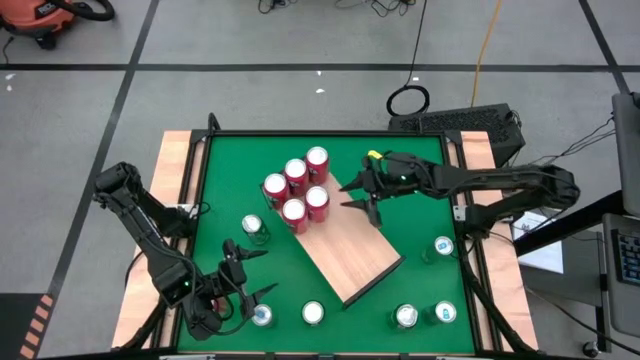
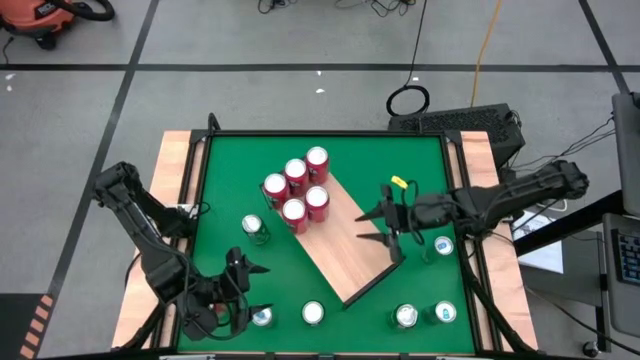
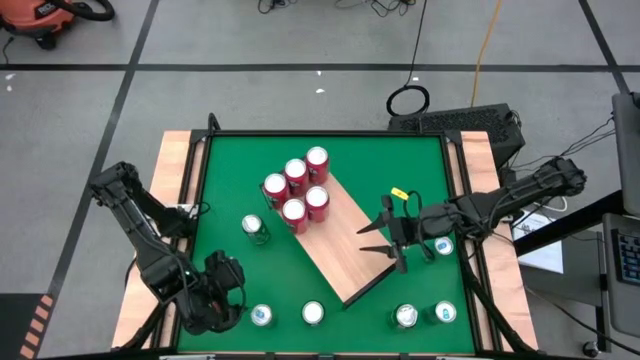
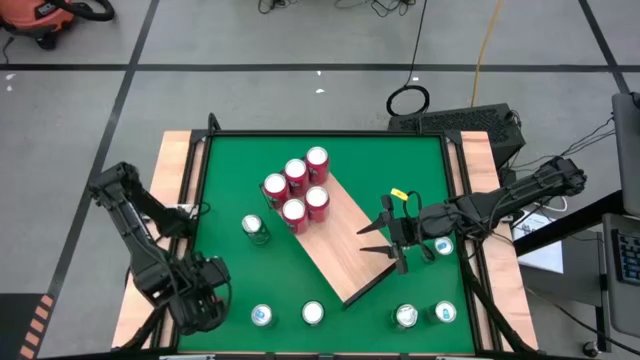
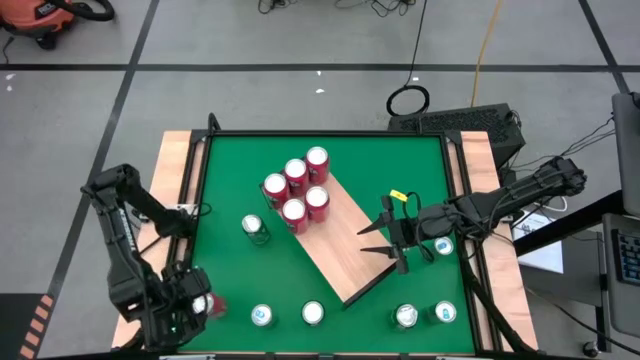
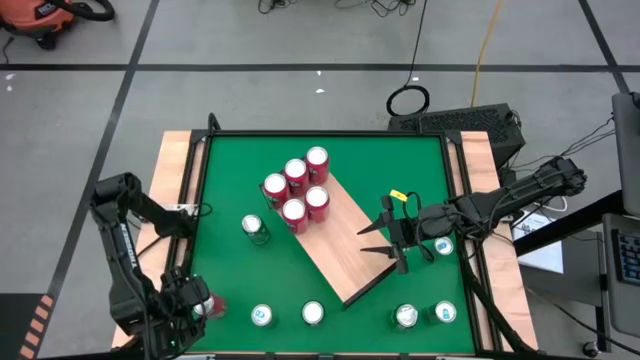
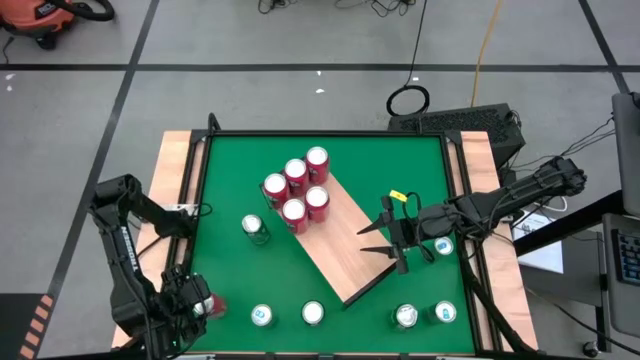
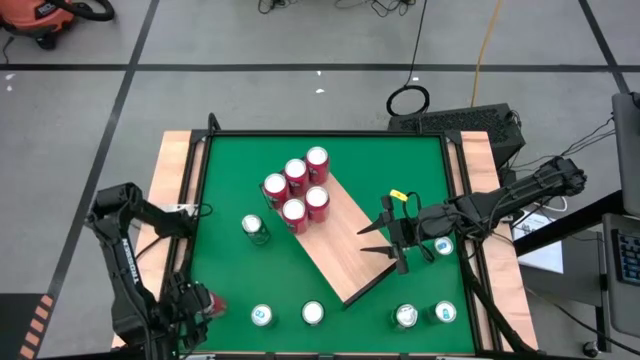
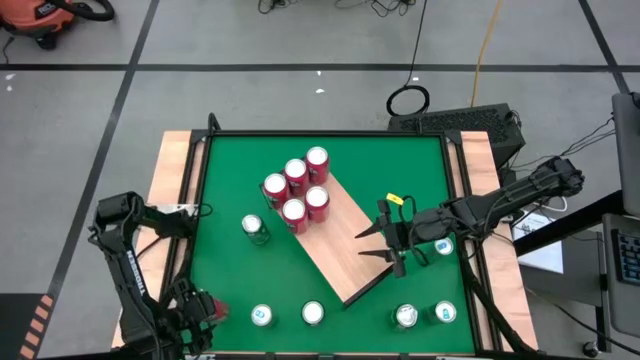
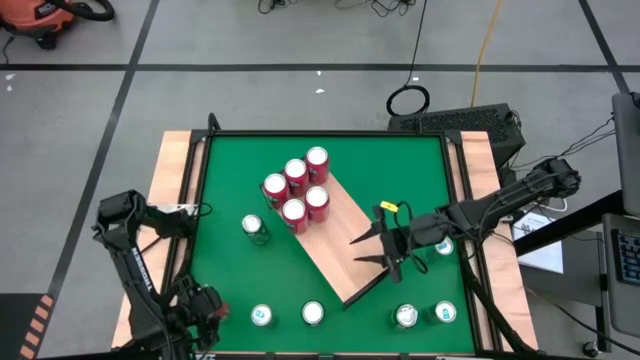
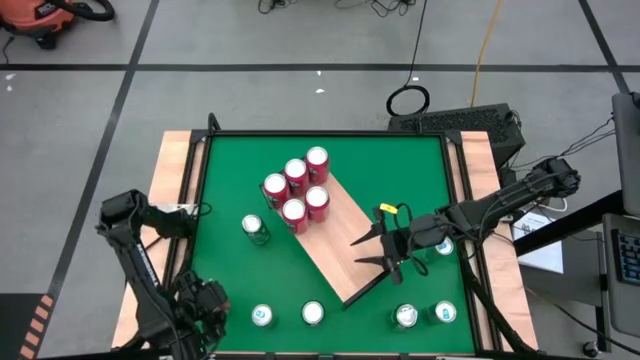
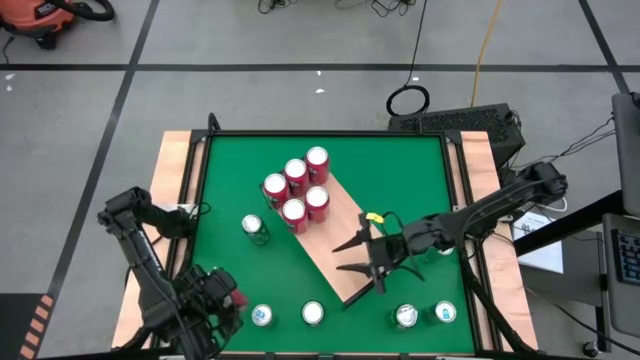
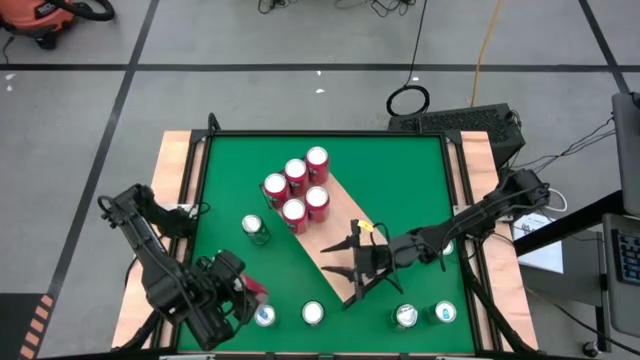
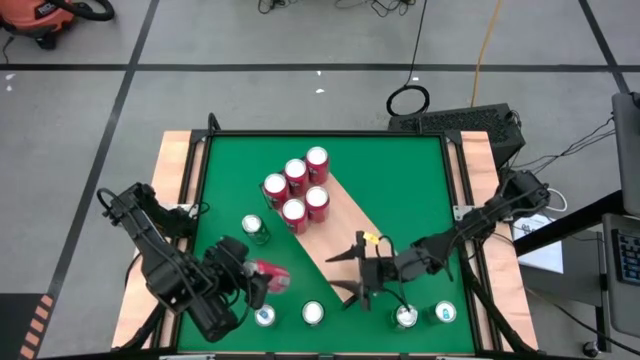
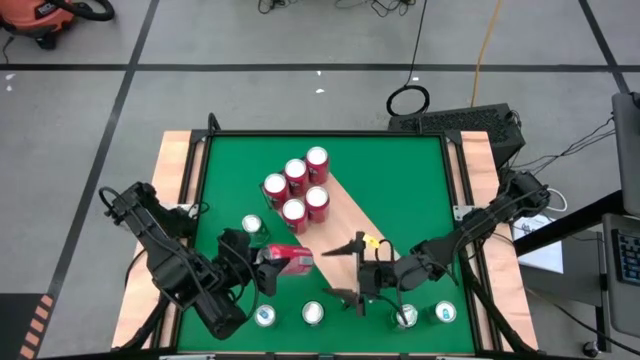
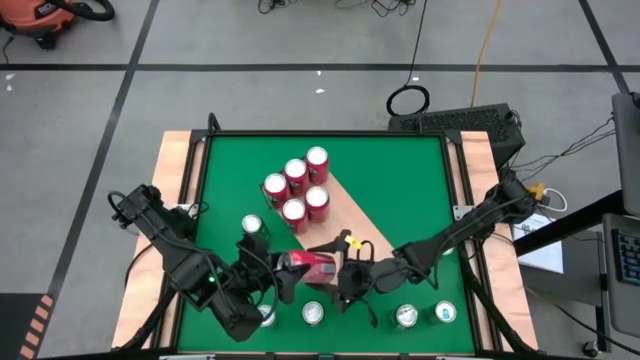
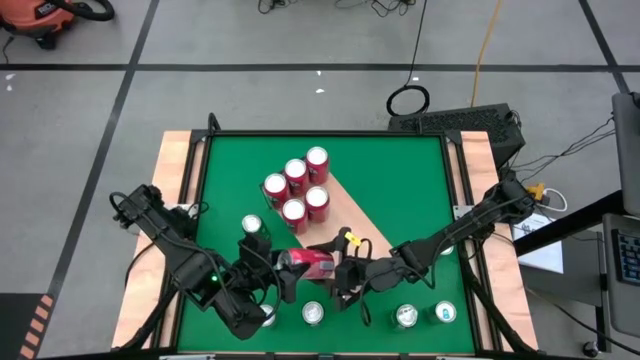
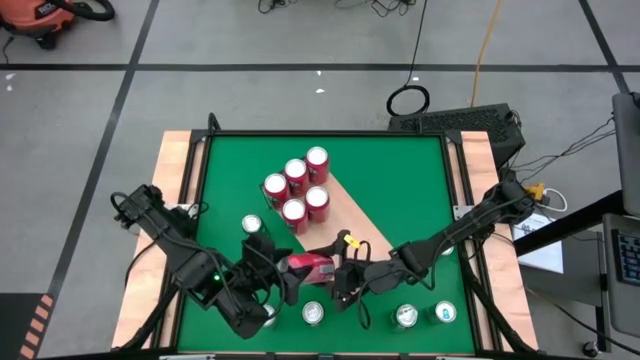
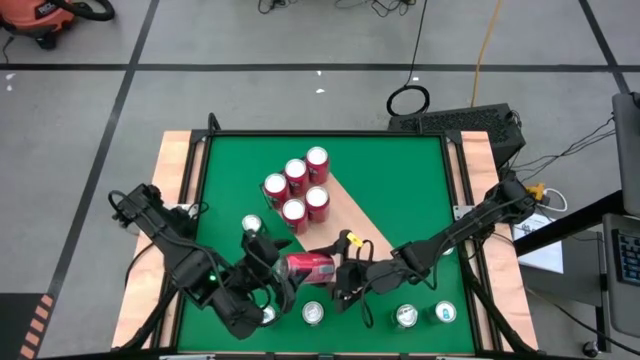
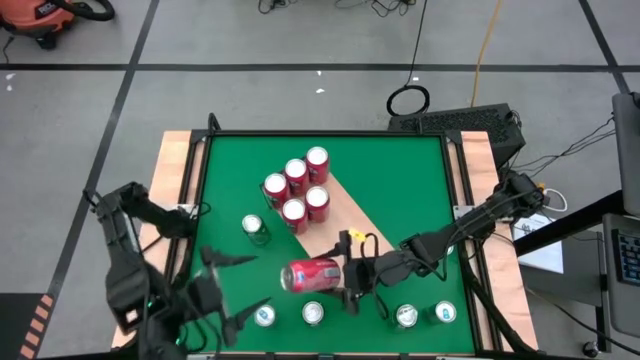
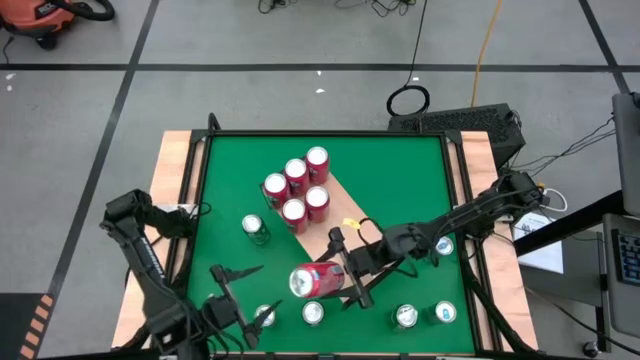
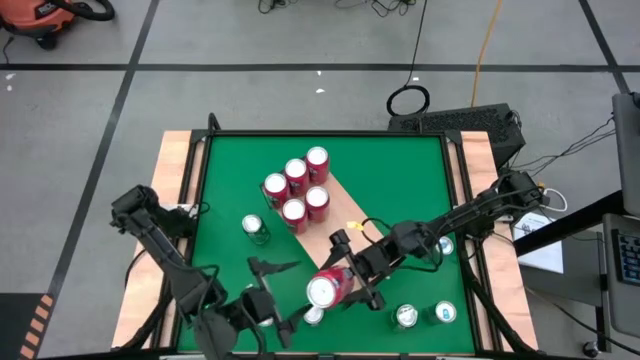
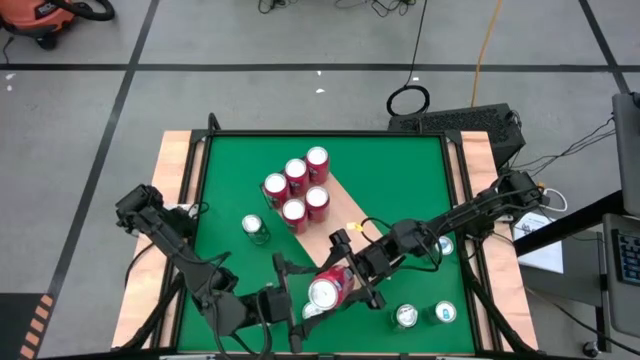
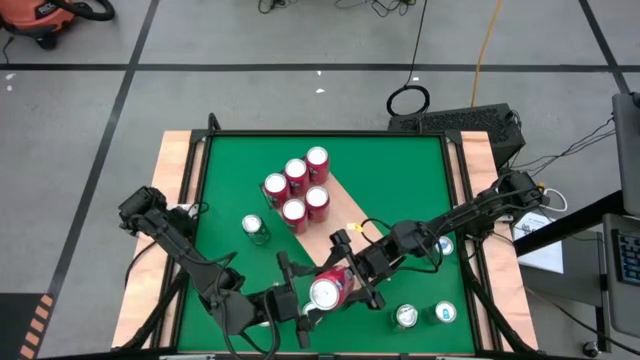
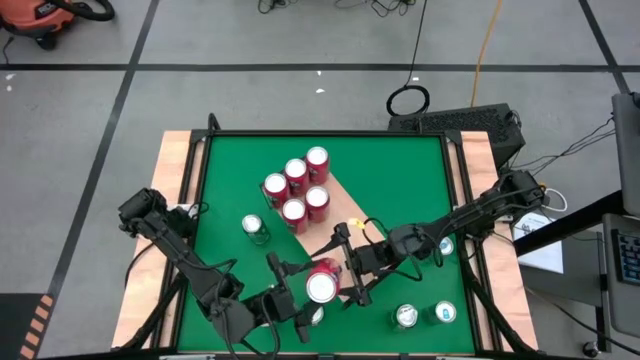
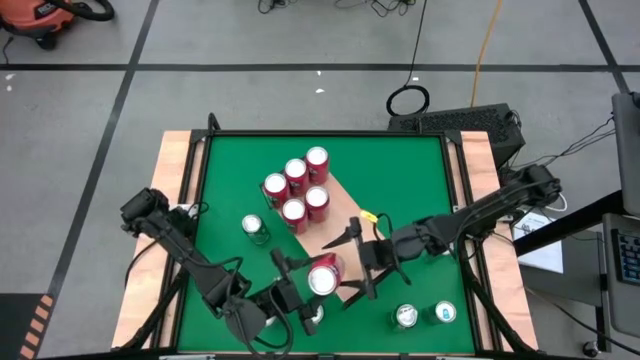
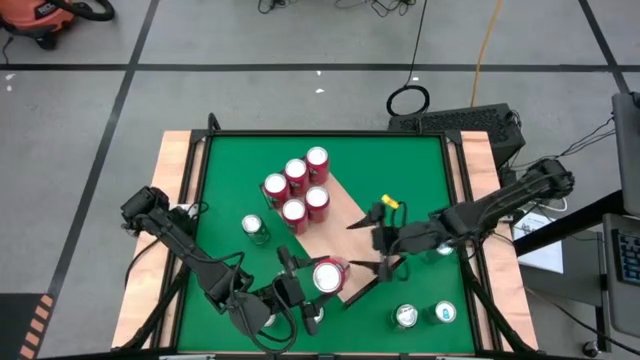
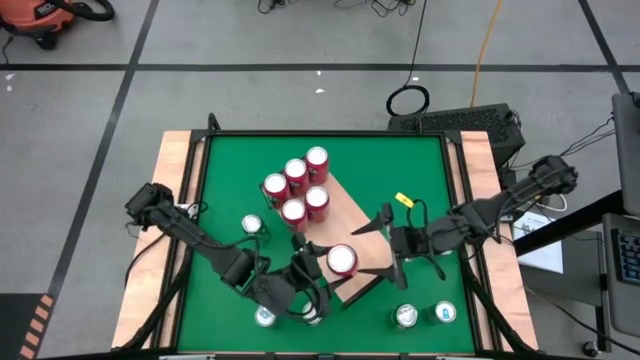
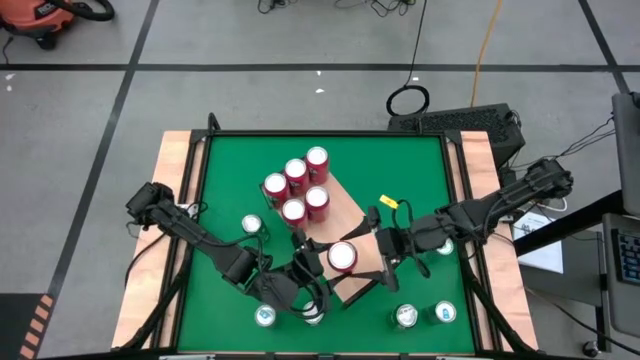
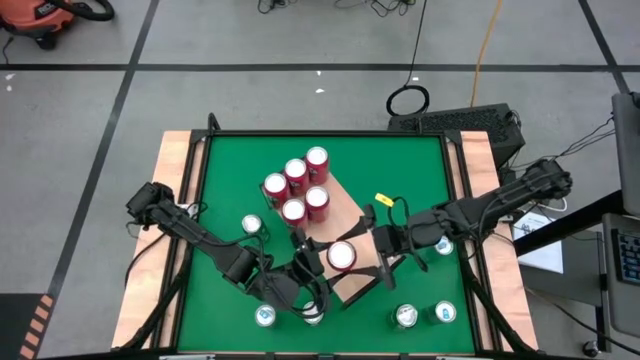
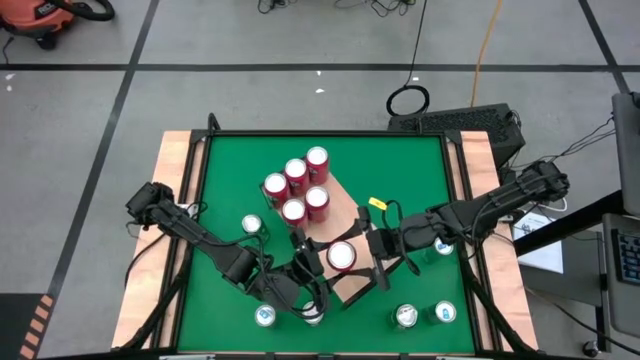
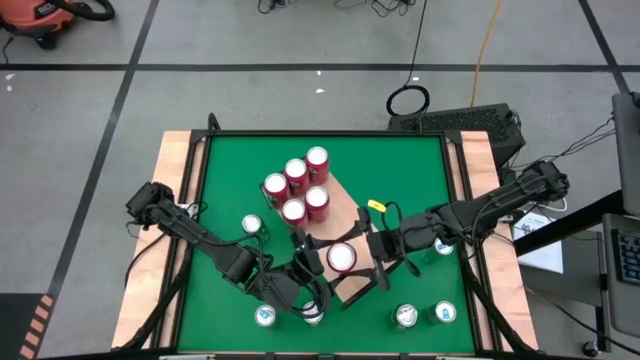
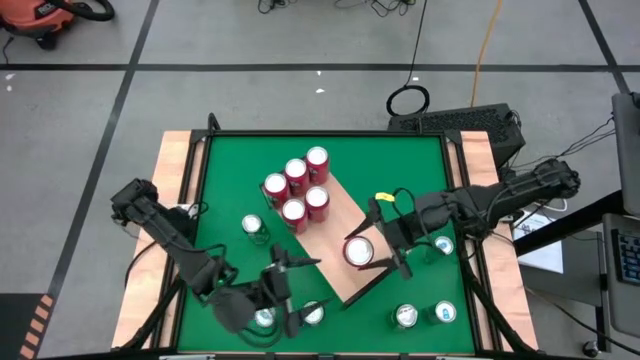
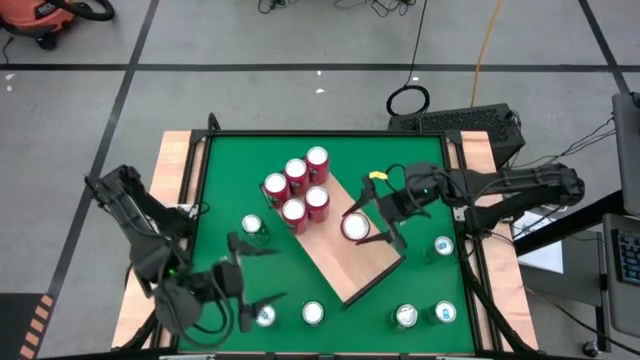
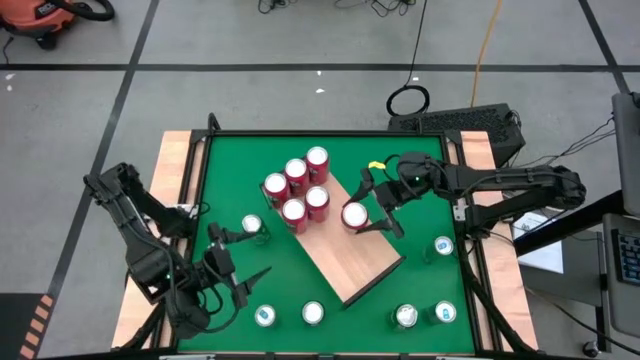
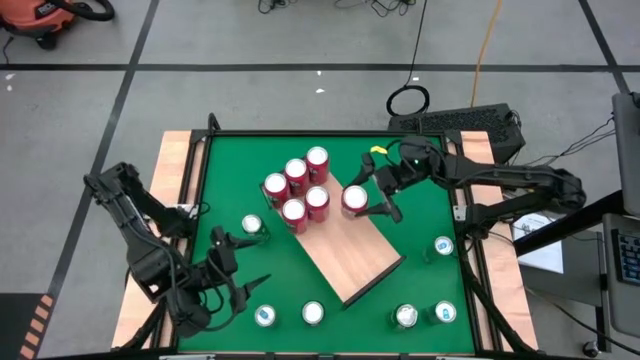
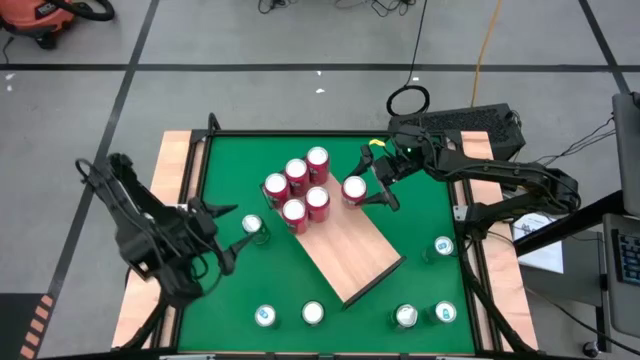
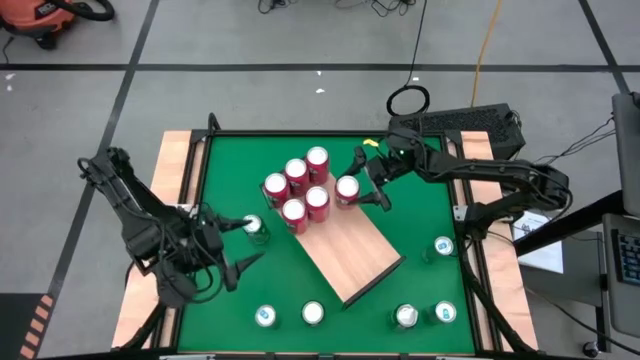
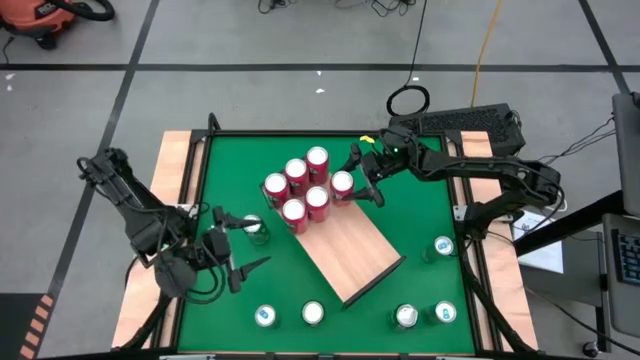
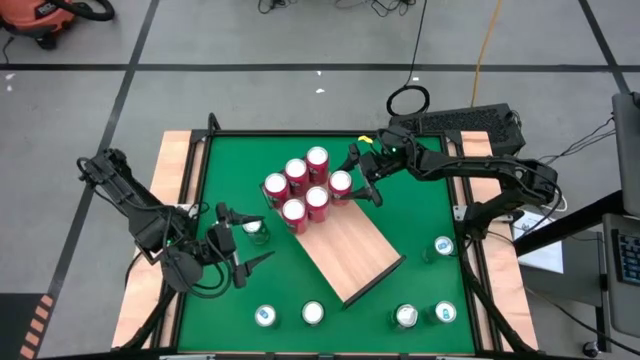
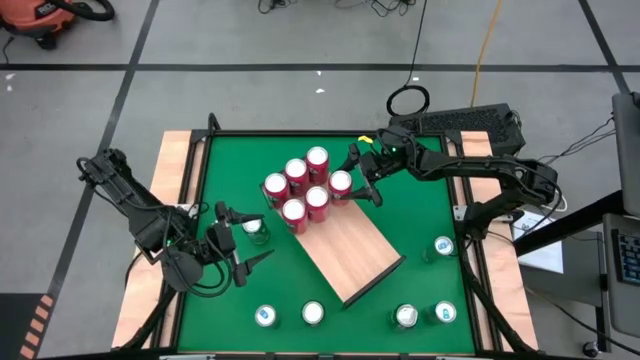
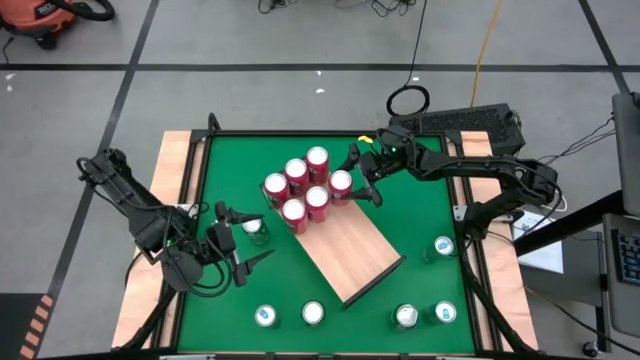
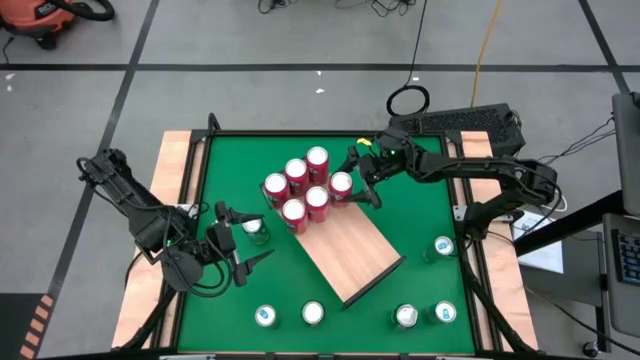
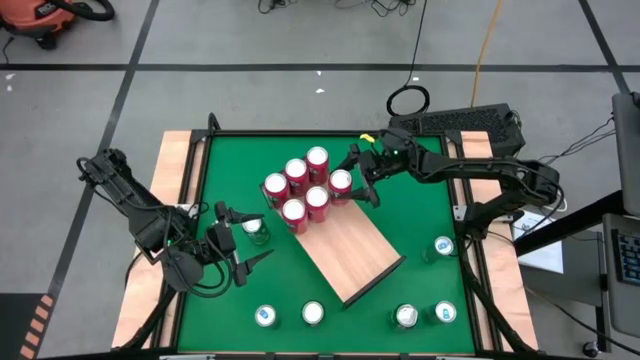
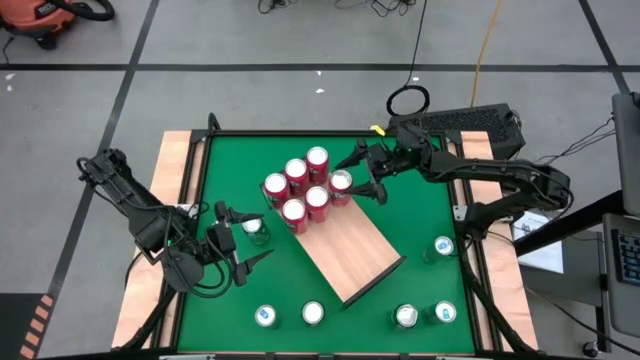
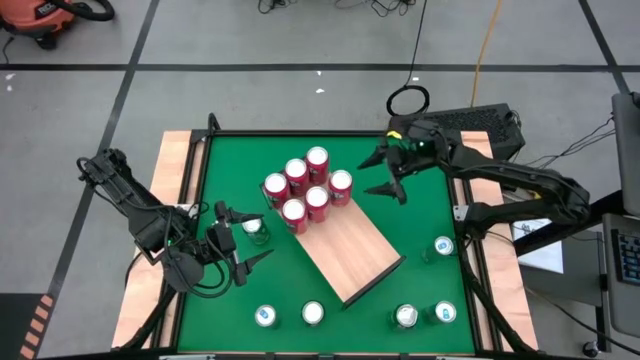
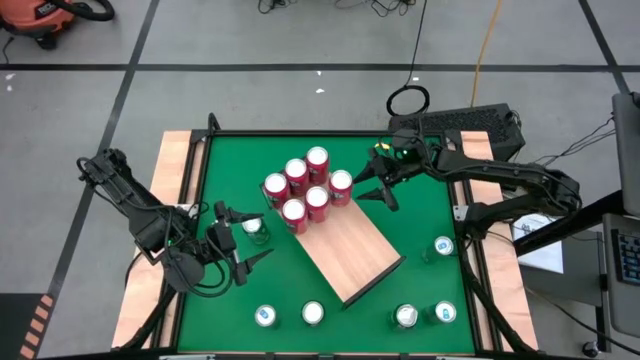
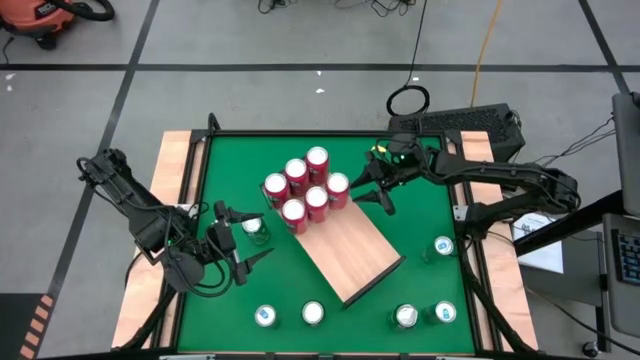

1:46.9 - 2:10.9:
Task: Place canned beverage on shelf
Put the red soda can on the shelf aligned with the other red soda can
